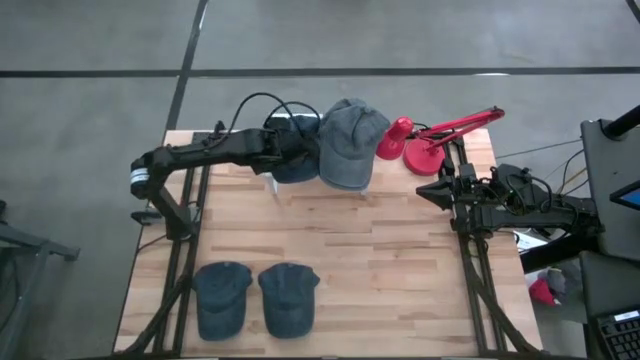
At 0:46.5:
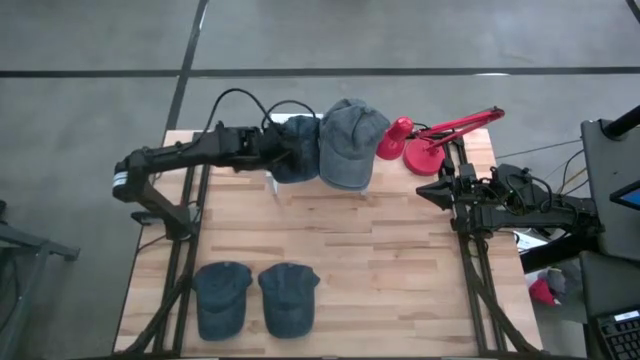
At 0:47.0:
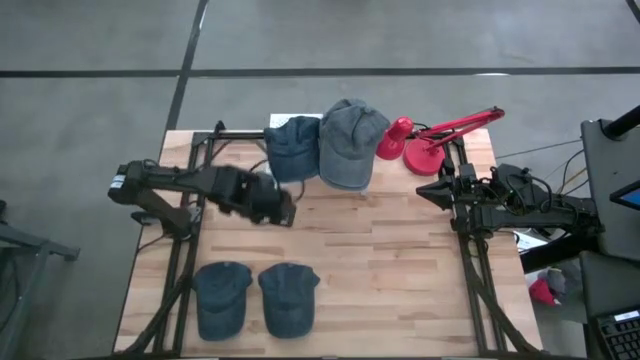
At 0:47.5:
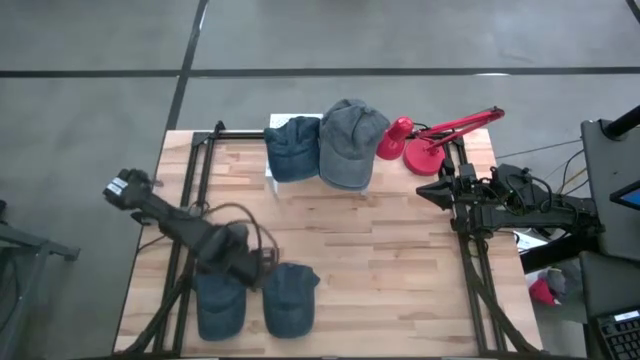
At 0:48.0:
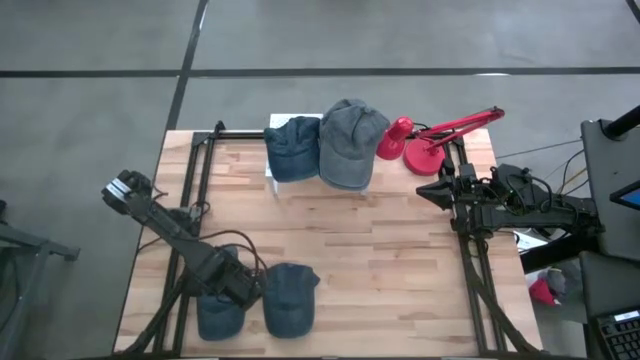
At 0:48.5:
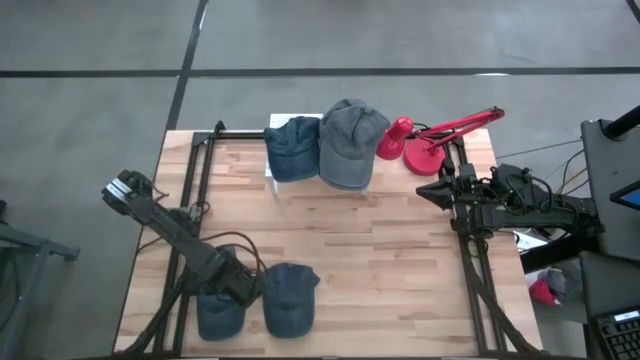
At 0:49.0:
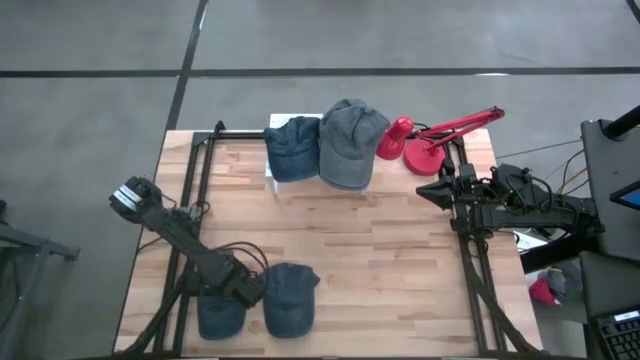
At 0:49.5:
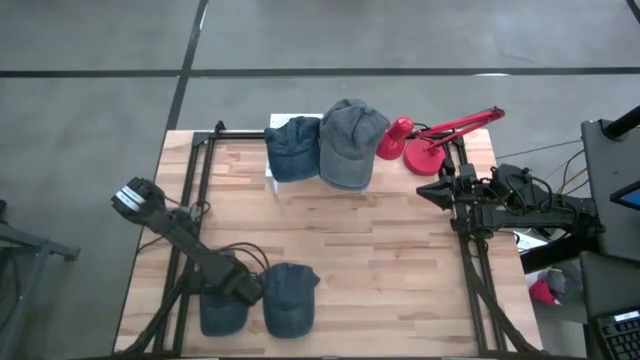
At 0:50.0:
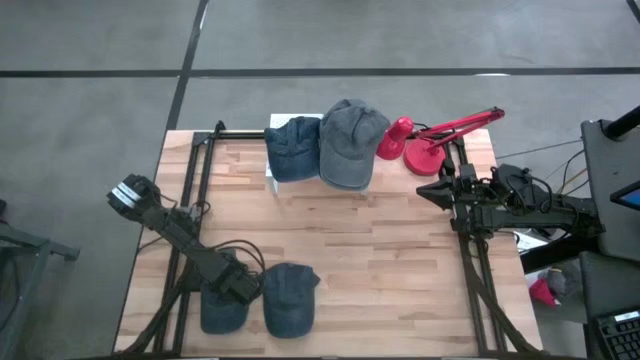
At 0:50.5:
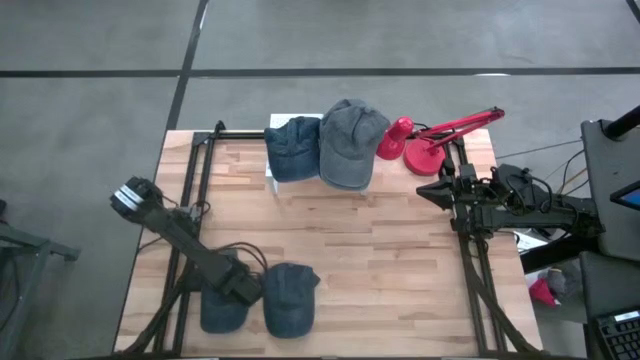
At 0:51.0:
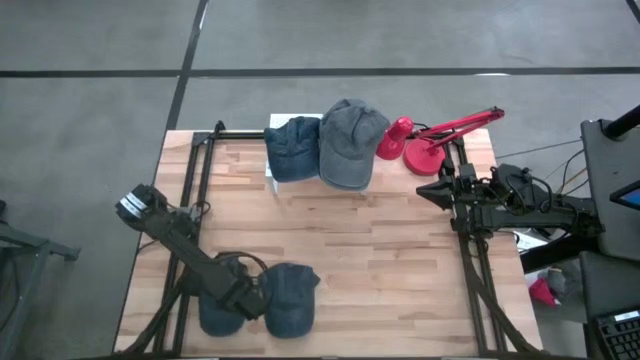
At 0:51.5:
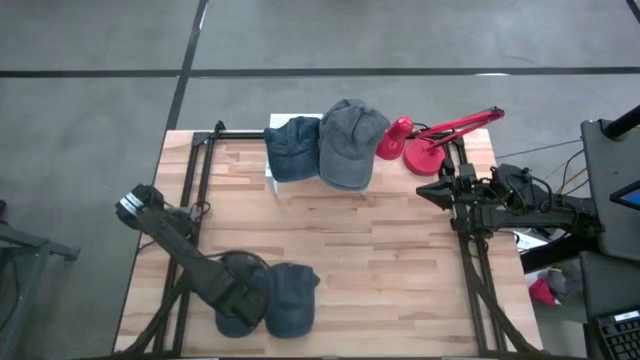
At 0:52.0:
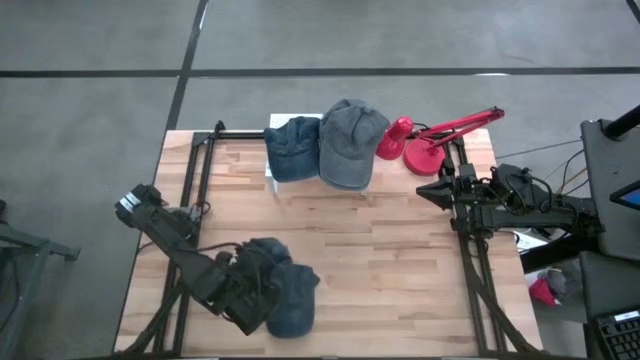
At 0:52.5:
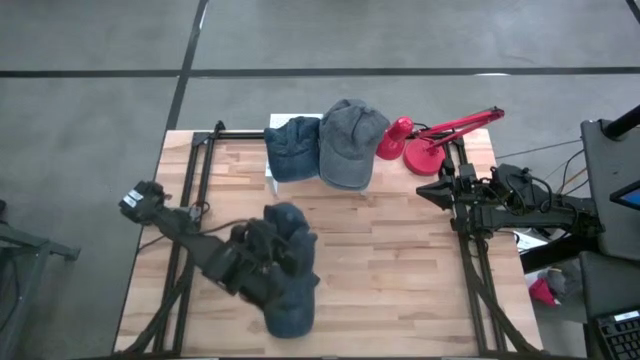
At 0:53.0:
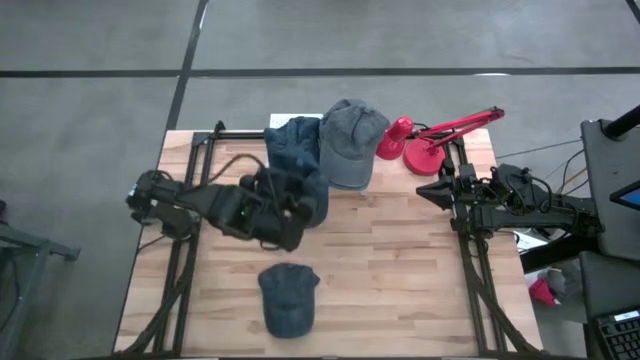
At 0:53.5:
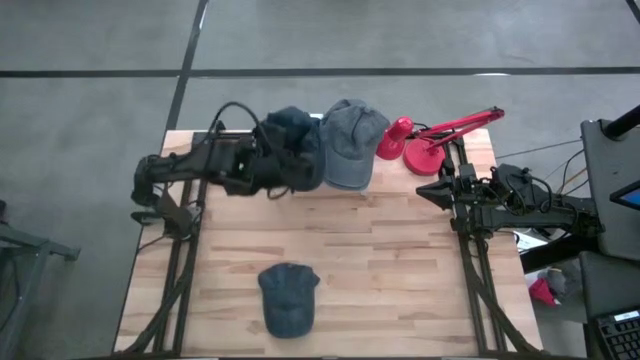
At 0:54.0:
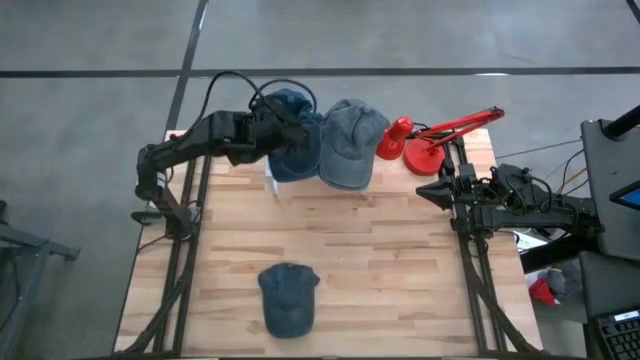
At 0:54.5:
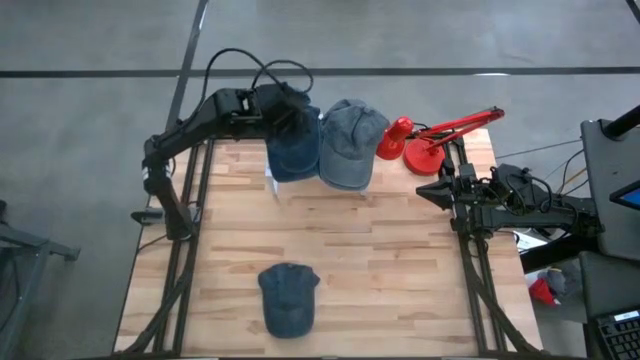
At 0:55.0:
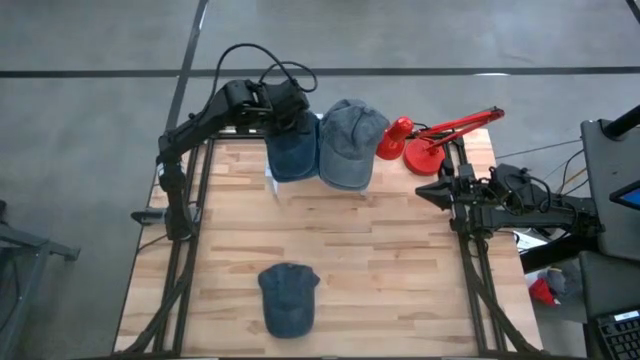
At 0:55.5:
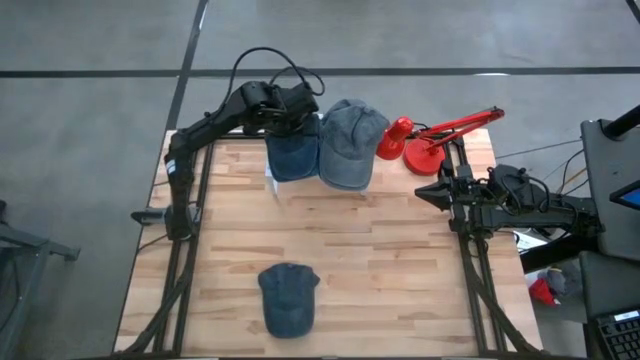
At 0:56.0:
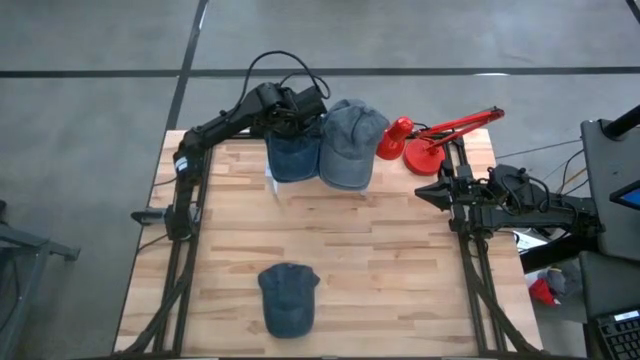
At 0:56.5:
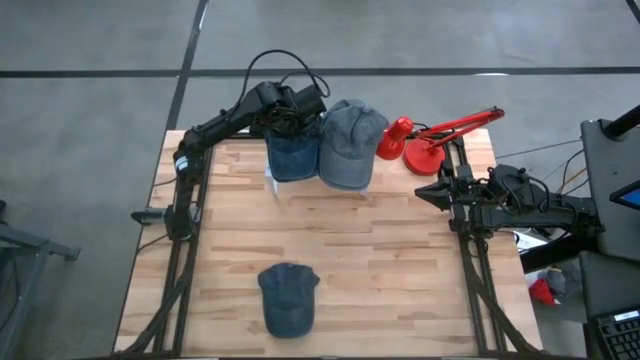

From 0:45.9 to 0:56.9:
Task: Pick & Place hat
Stack the left black cap on top of the other blue cap on the shelf

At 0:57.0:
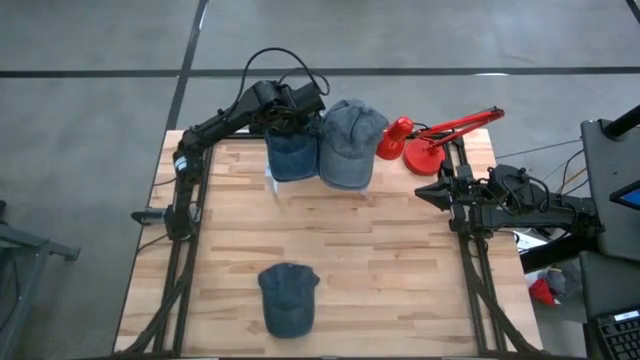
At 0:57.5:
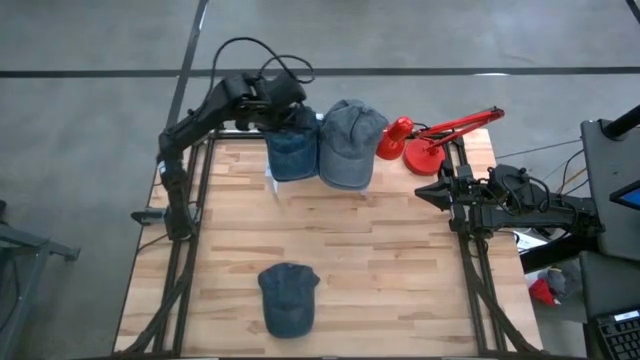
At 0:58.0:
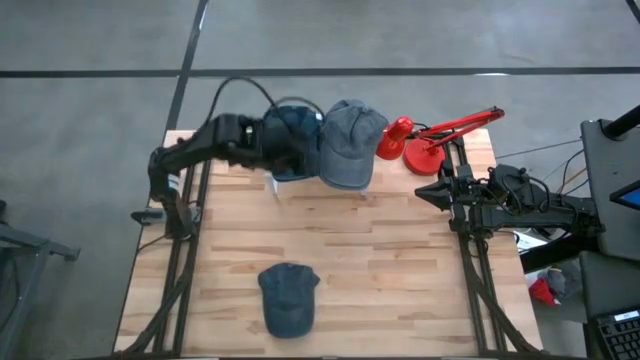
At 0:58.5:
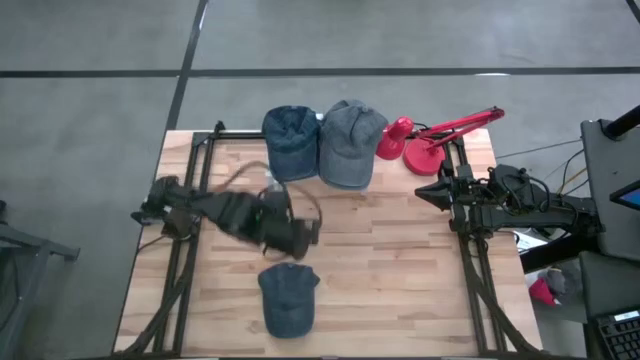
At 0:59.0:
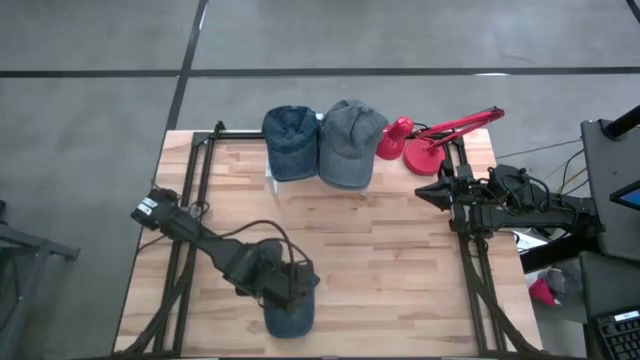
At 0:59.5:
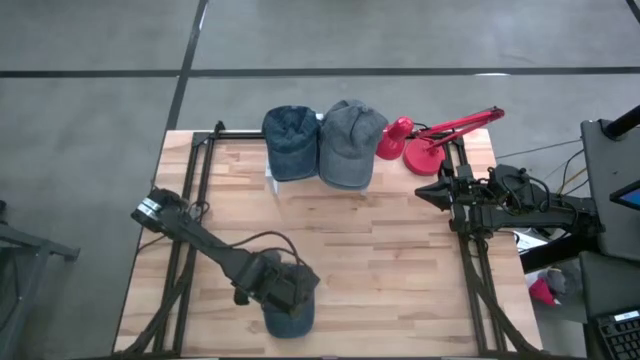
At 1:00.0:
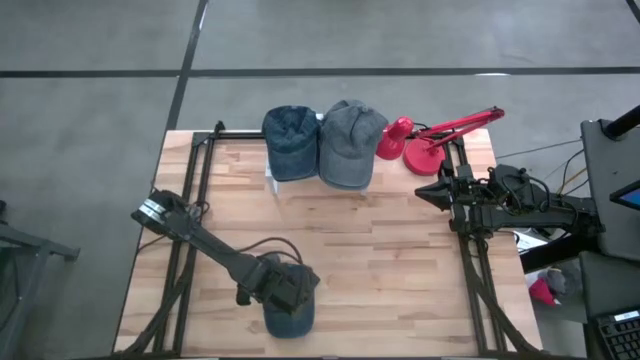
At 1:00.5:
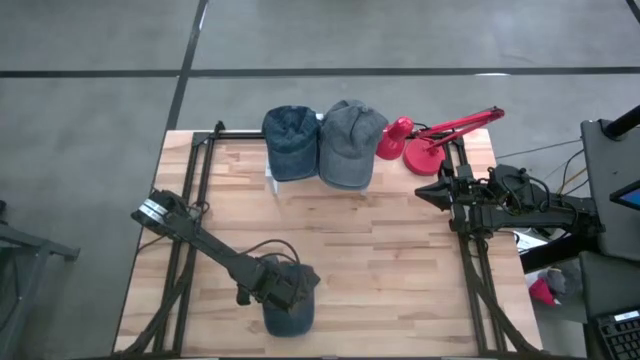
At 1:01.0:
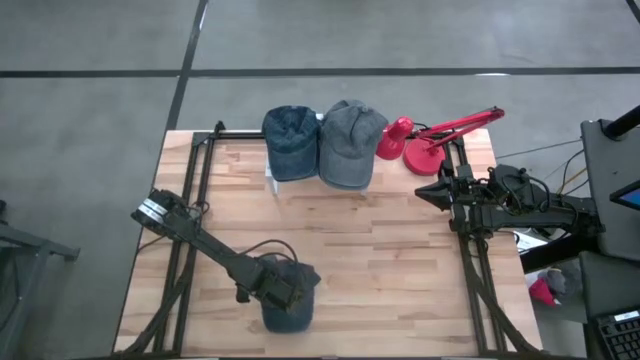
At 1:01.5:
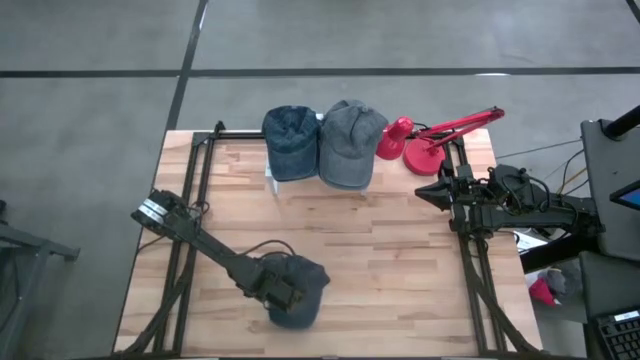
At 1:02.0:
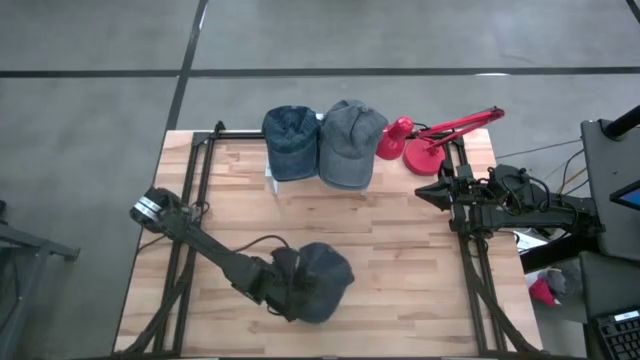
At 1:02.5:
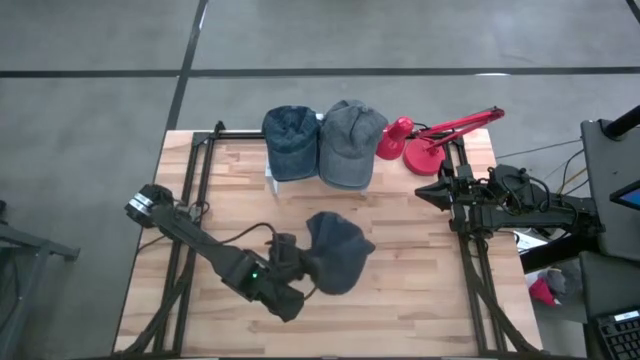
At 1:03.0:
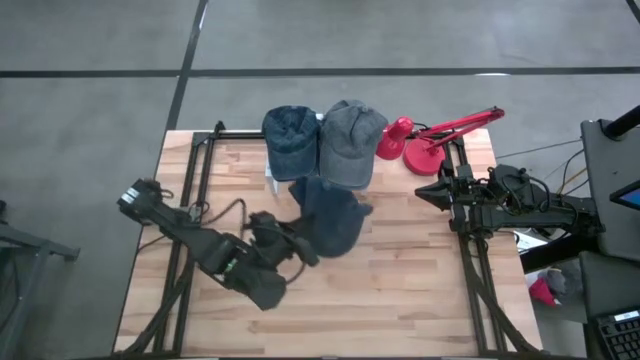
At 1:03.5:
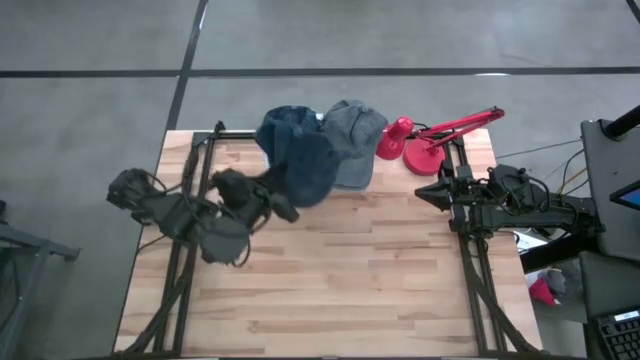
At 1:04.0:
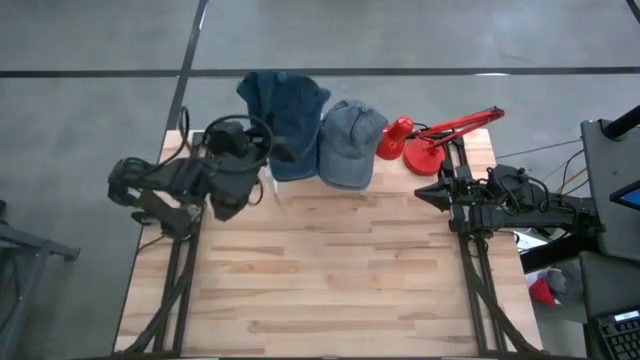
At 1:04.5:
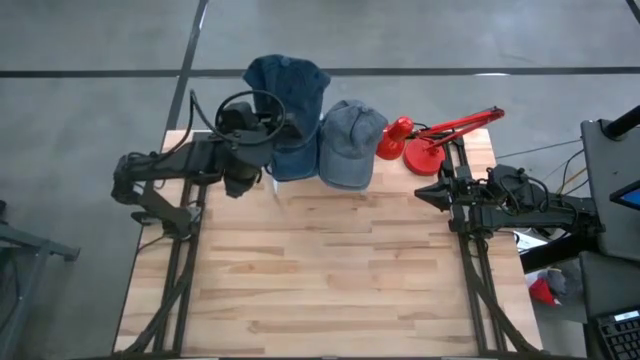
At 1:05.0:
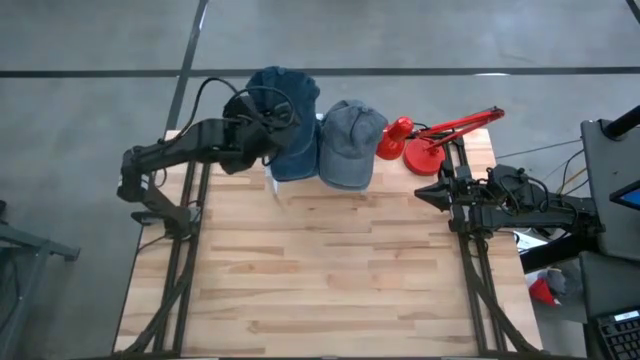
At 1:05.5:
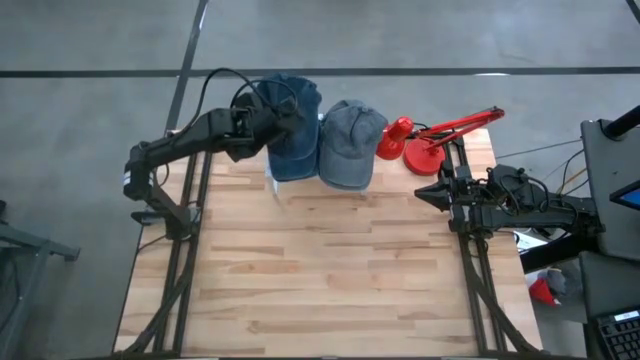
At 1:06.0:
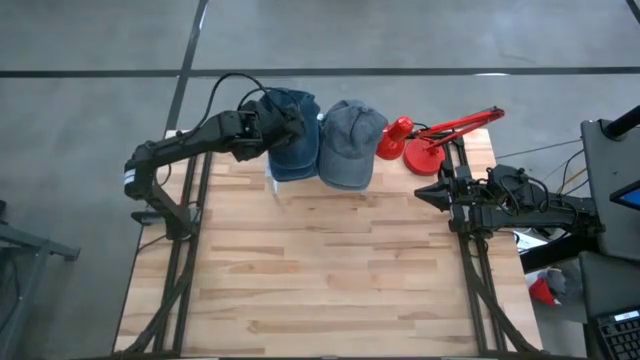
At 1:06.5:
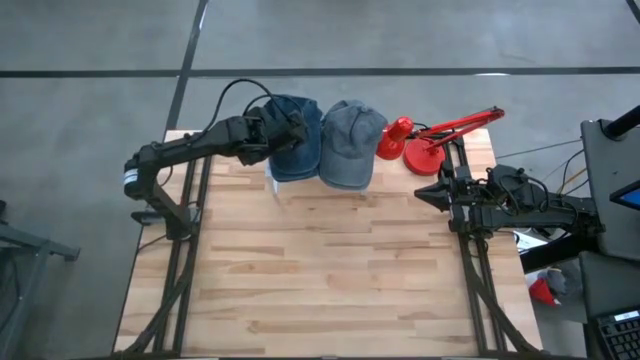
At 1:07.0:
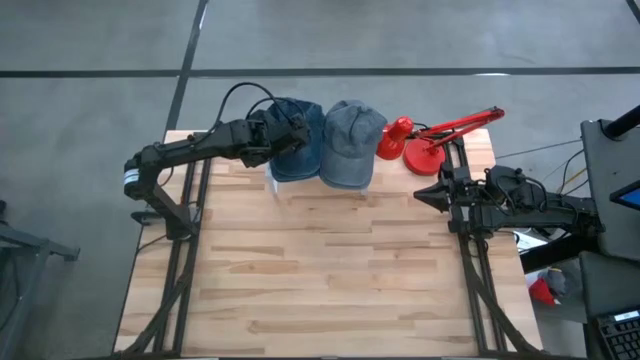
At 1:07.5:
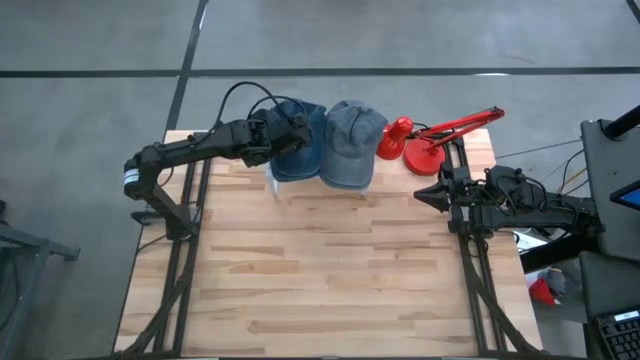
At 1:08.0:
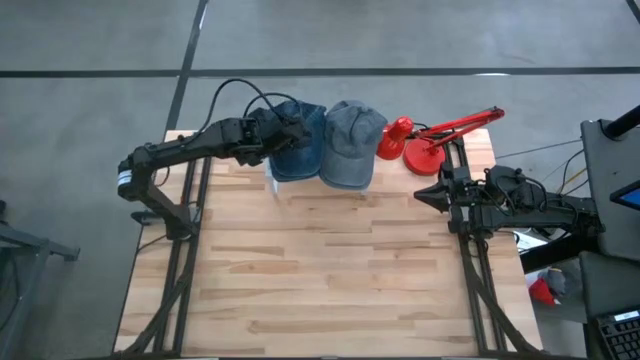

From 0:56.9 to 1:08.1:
Stack the black cap on top of the other blue cap on the shelf
